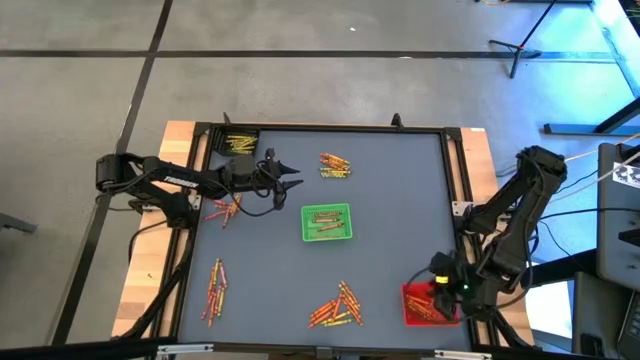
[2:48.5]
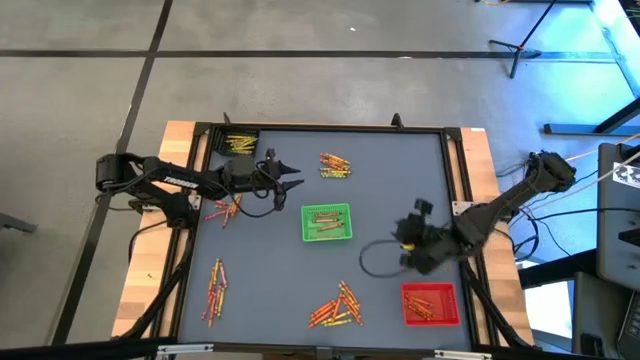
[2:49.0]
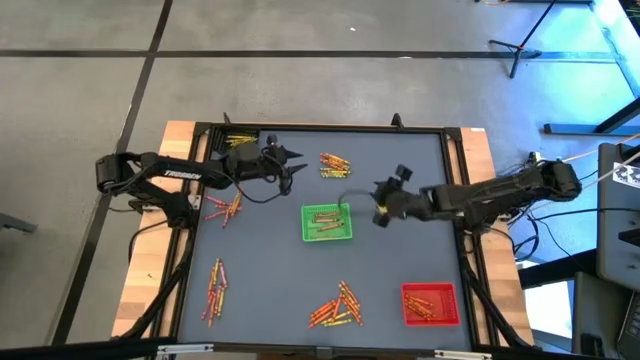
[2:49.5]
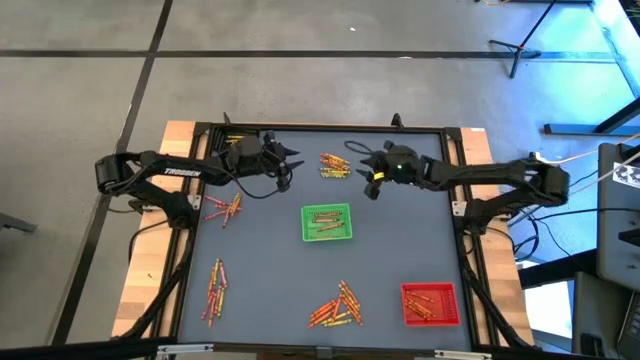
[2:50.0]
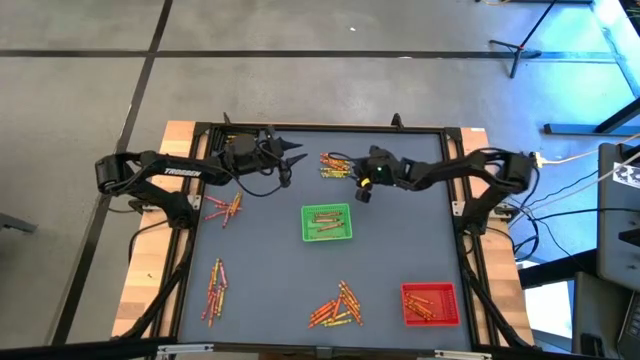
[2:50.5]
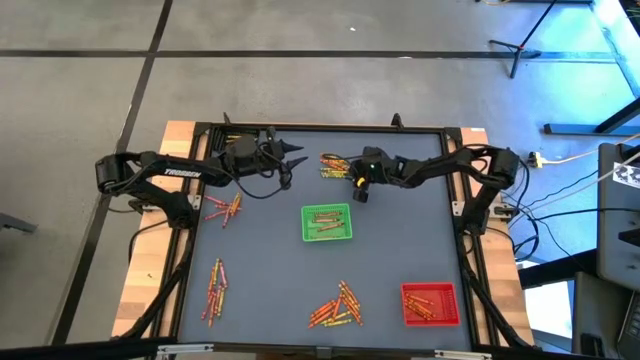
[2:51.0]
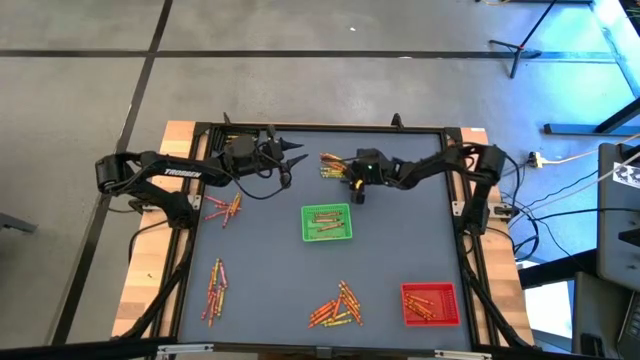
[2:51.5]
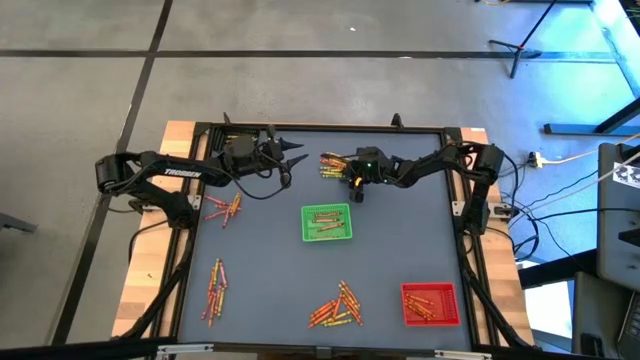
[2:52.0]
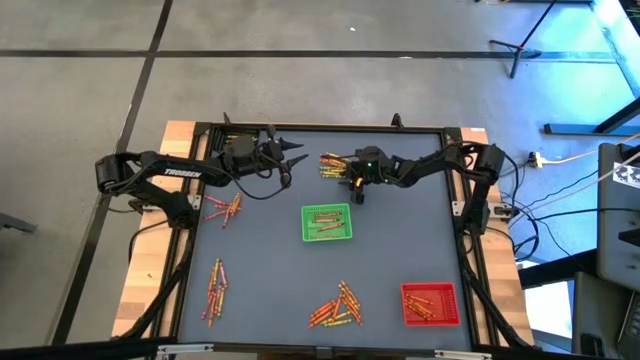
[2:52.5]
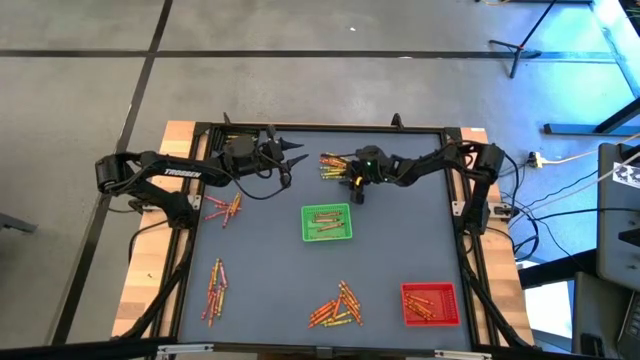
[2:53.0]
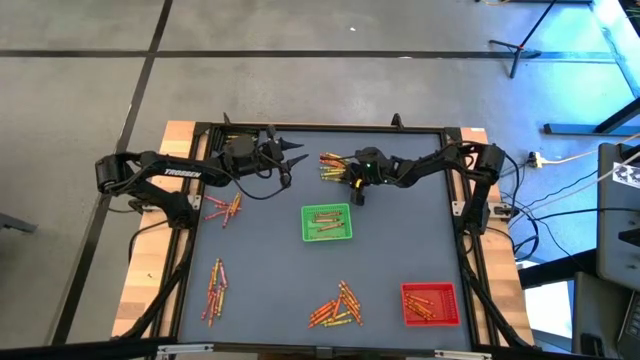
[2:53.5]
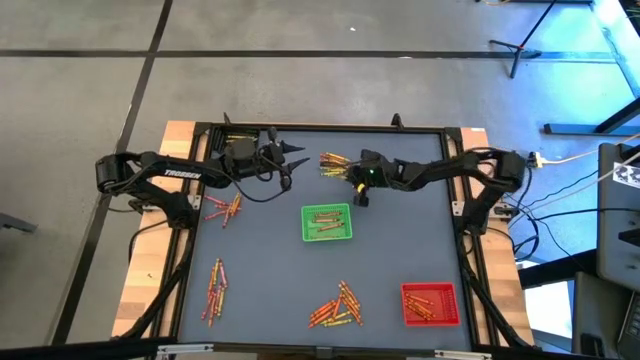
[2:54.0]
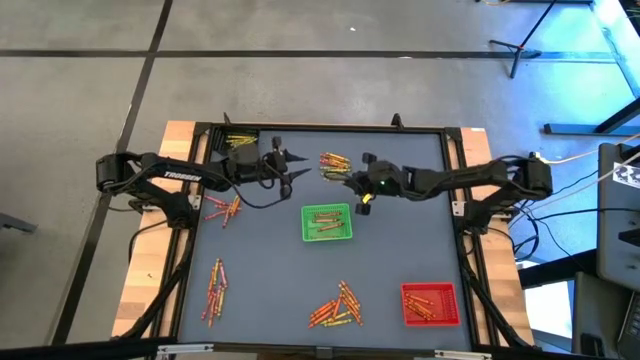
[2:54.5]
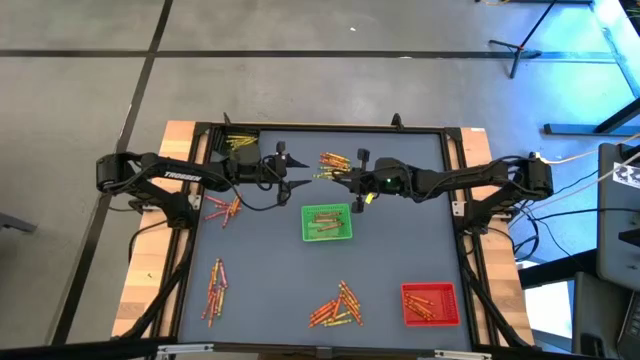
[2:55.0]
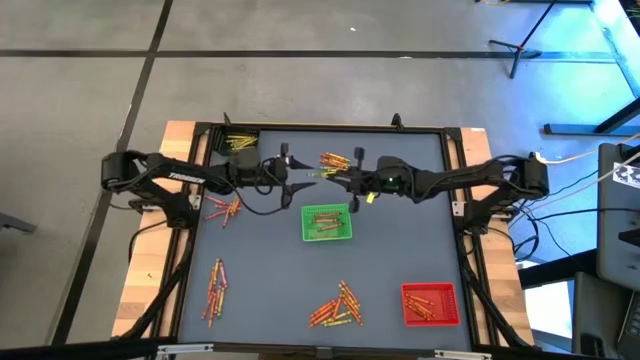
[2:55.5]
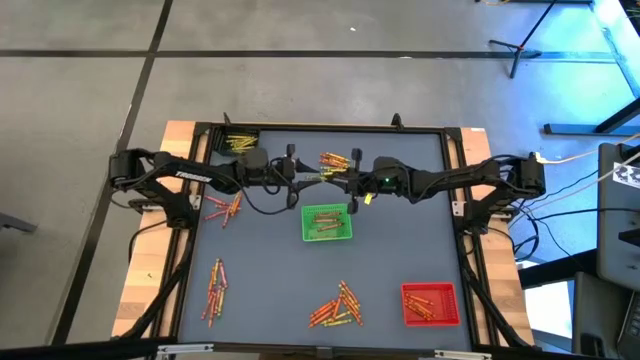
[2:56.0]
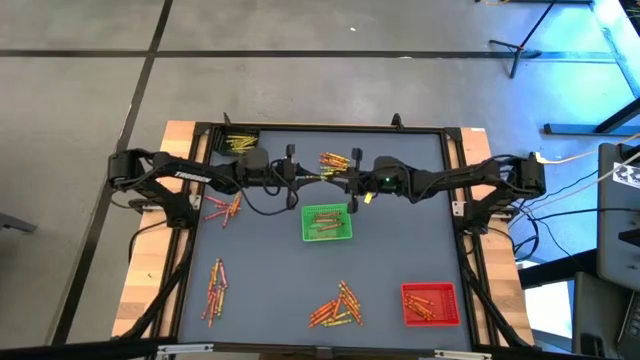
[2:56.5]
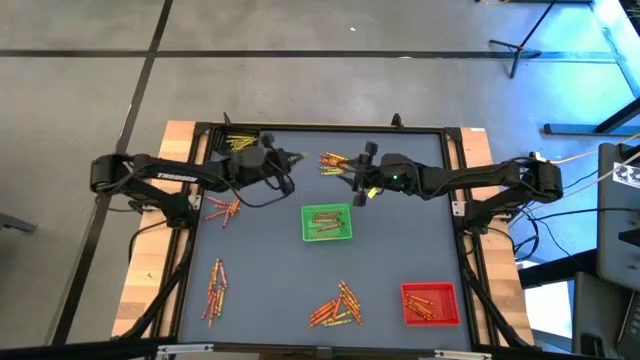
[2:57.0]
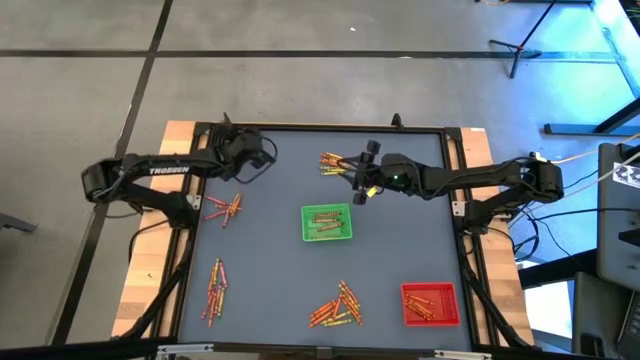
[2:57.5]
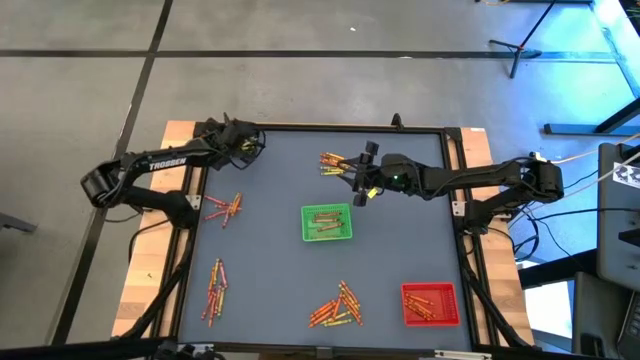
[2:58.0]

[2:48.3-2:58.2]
Task: Sort crayons
Put the green crayon into the black bin

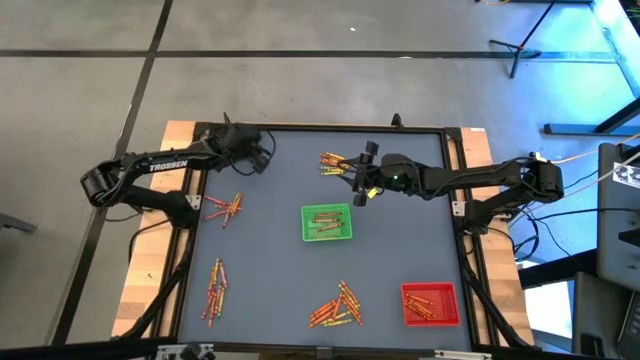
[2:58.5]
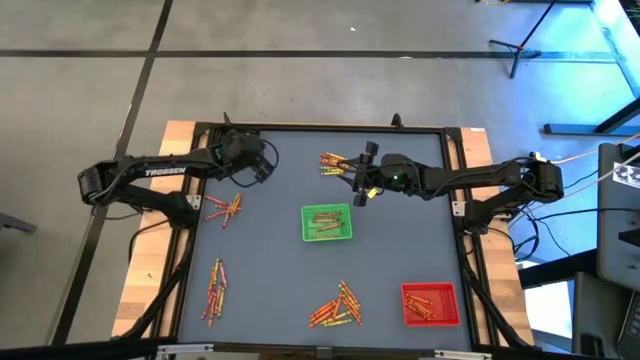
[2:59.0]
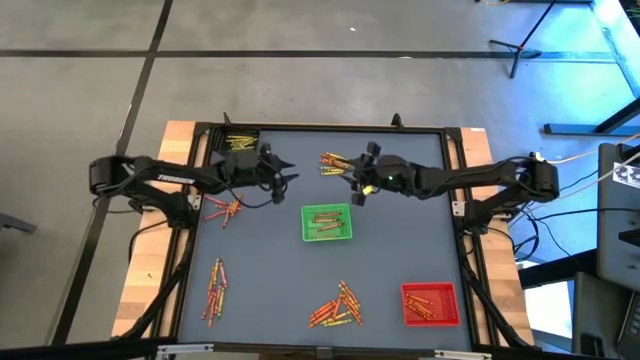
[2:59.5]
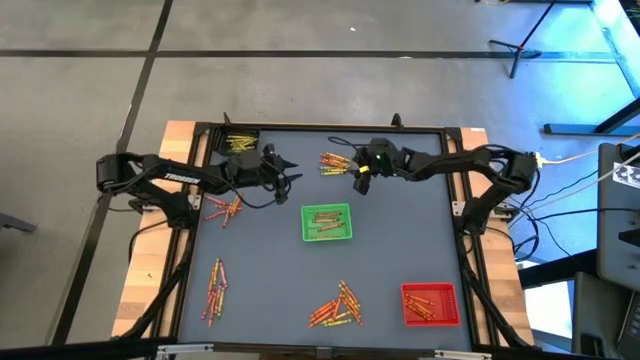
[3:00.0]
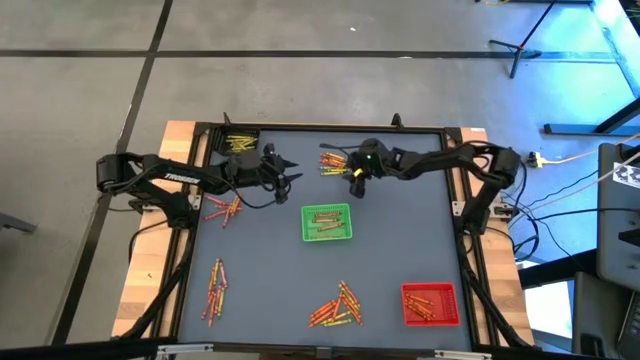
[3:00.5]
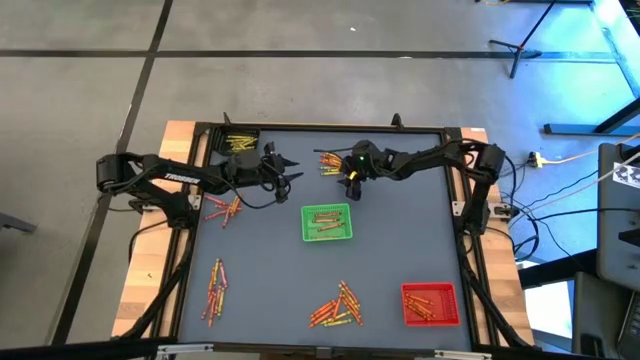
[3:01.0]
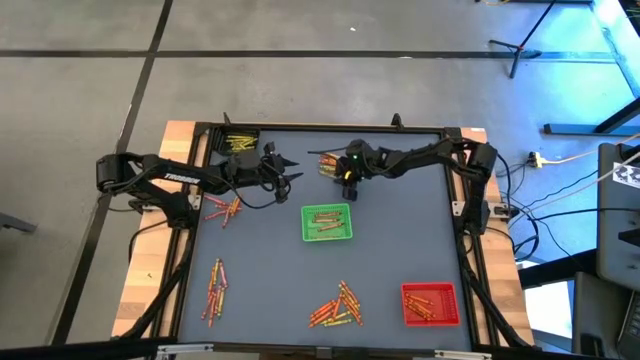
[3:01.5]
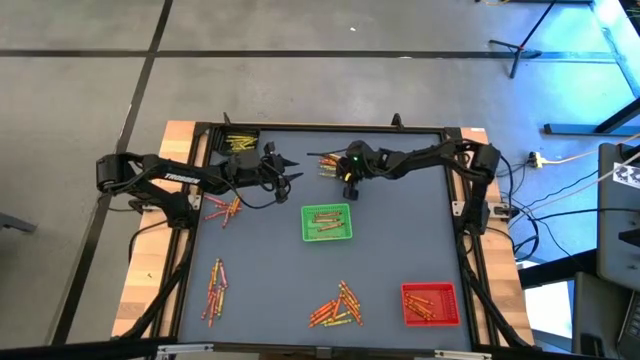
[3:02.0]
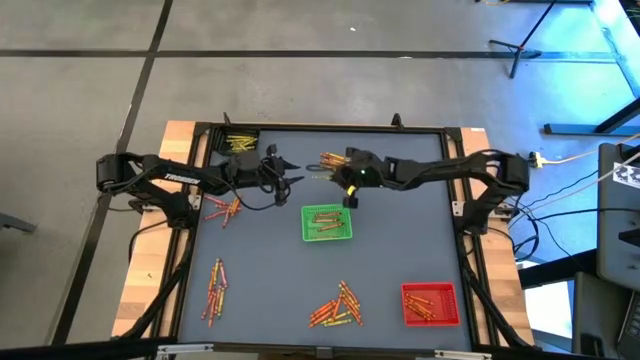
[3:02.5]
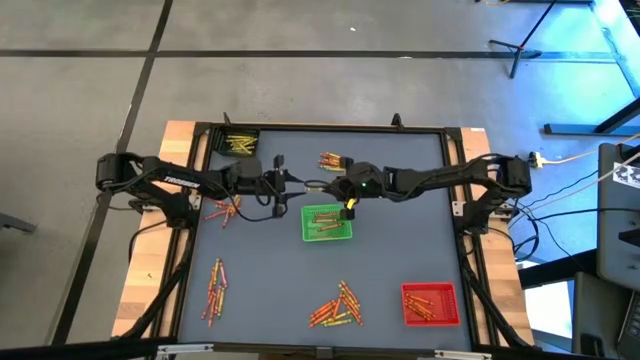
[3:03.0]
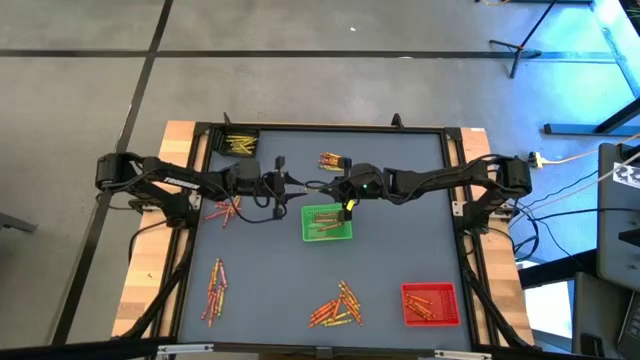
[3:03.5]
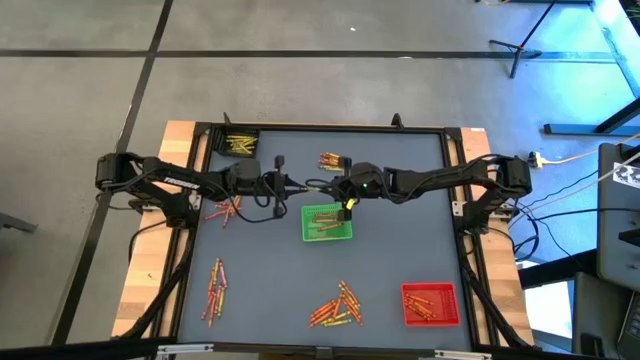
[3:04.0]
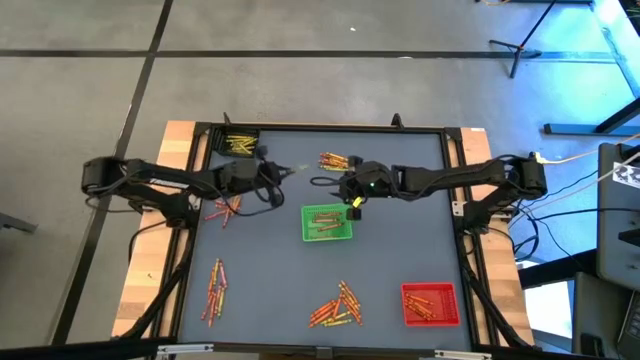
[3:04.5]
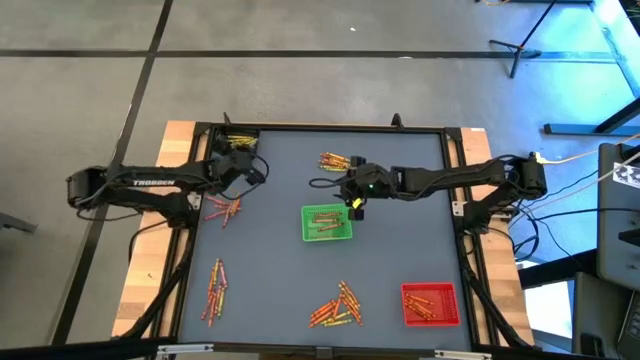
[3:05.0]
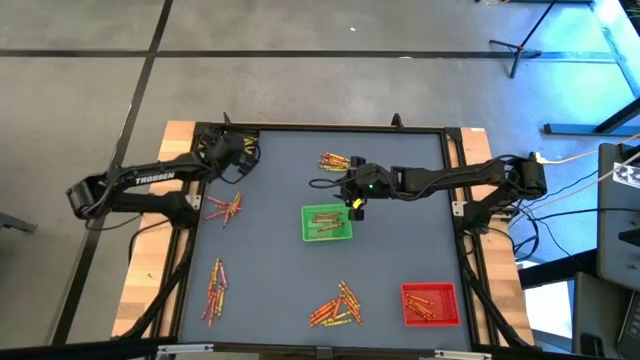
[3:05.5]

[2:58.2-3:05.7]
Put the green crayon into the black bin

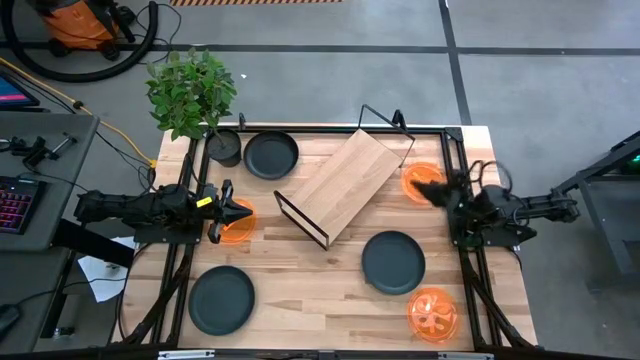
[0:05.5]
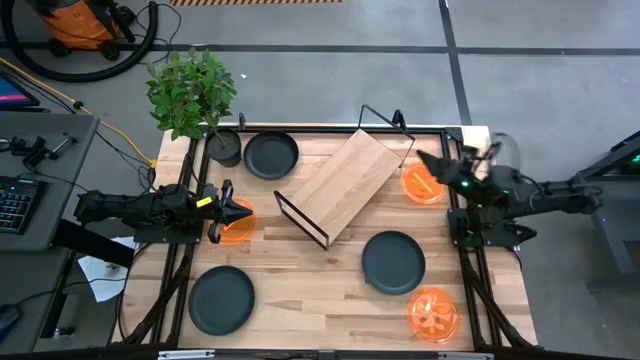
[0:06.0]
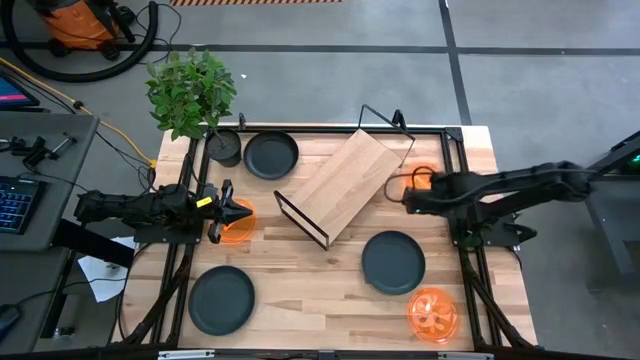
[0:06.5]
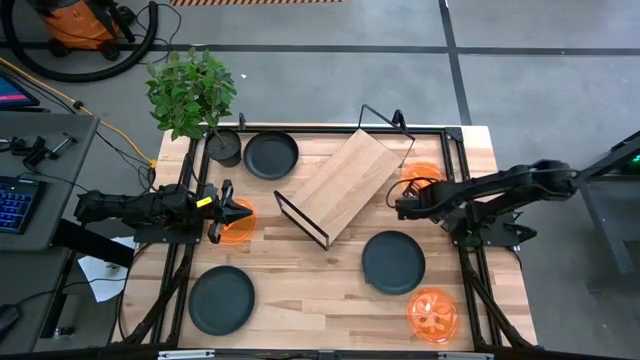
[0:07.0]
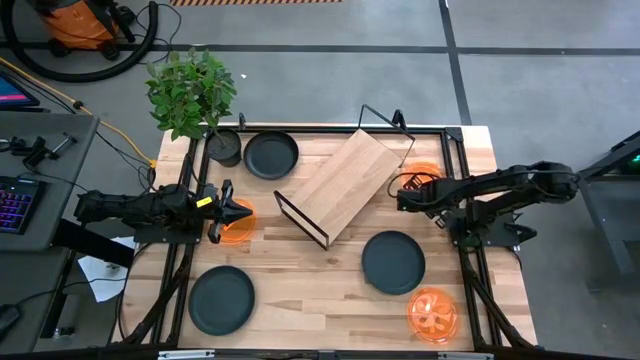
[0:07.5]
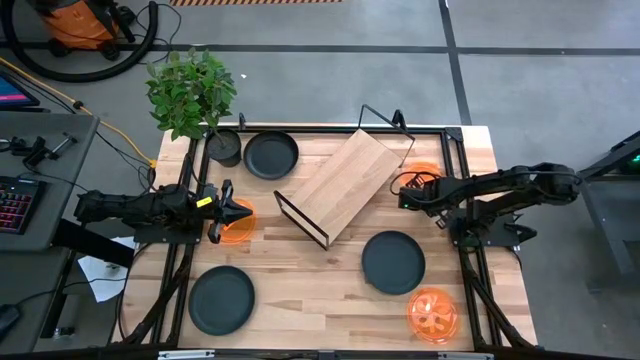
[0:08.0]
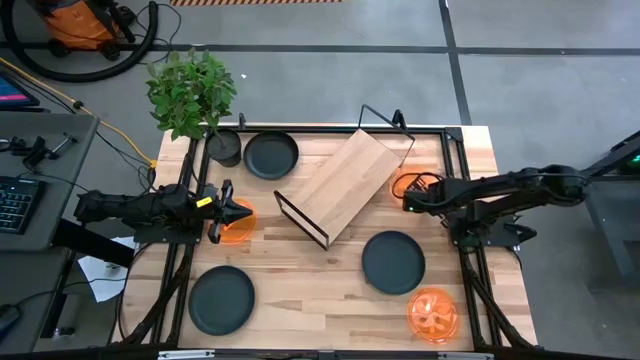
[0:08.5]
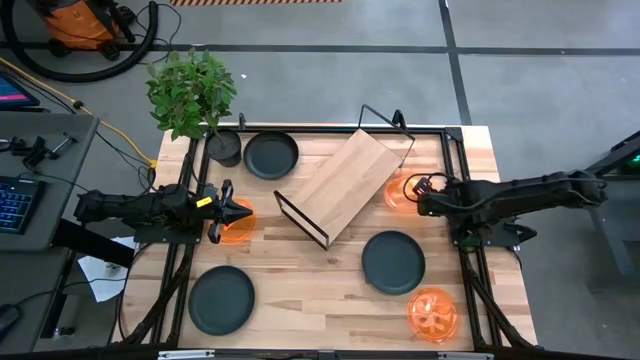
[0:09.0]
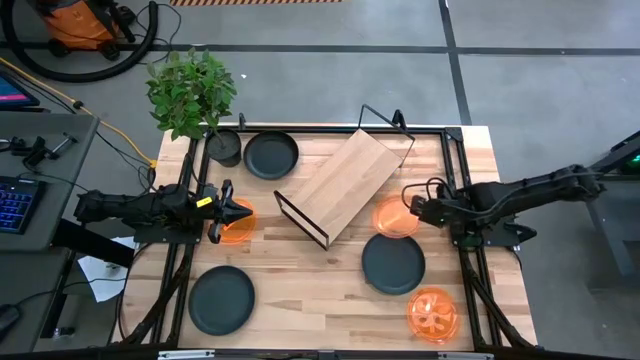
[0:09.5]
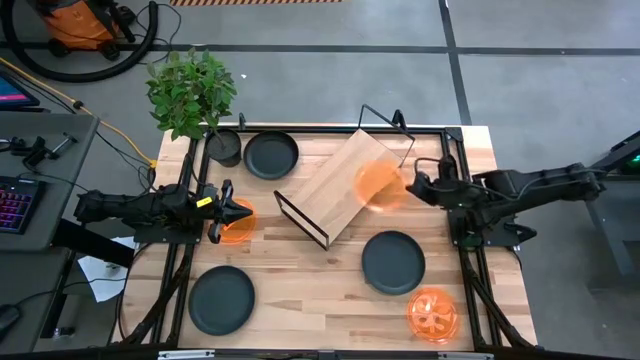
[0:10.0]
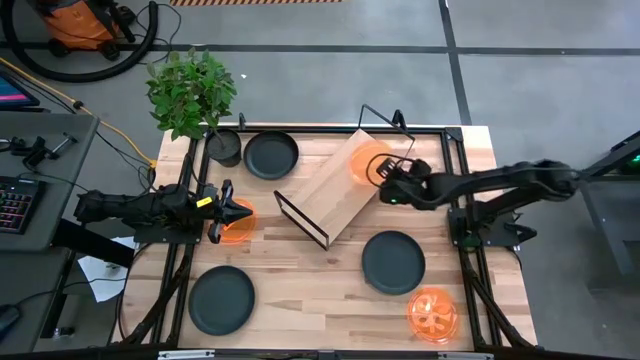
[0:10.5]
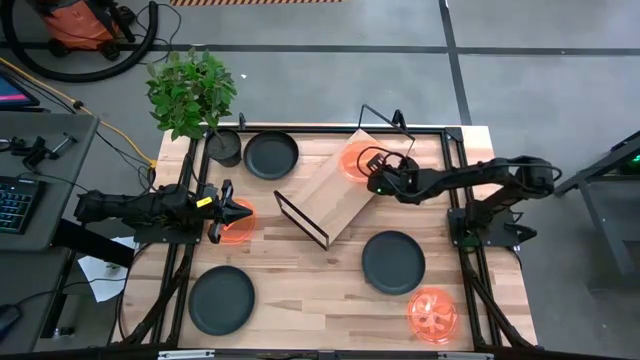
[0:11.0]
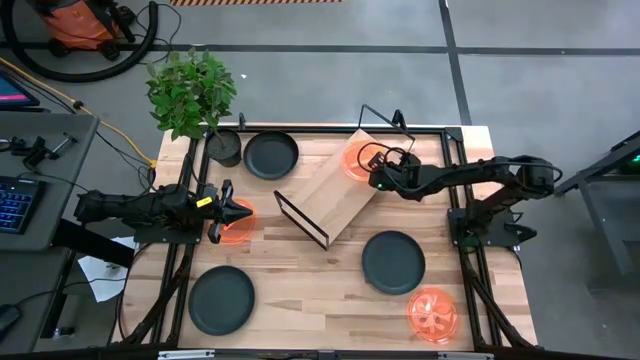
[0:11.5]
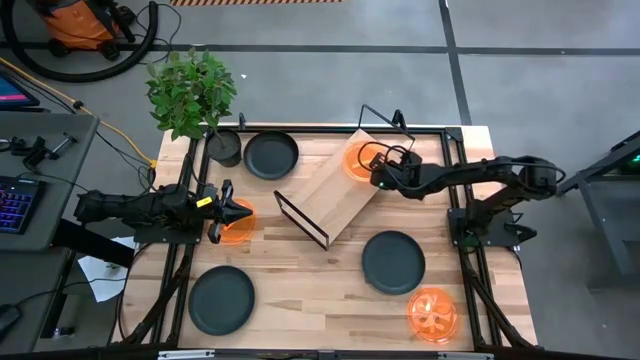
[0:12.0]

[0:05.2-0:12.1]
Task: Place and stack plates onto a shelf
Put the top right orange plate on the shelf
